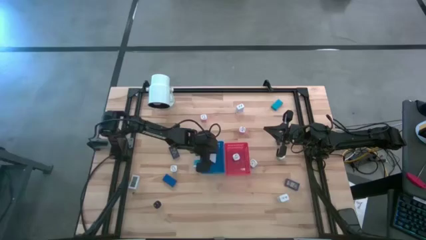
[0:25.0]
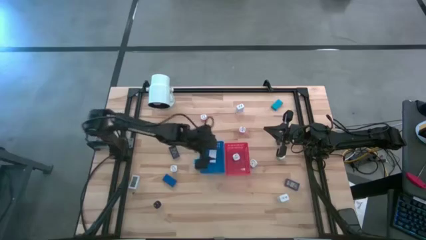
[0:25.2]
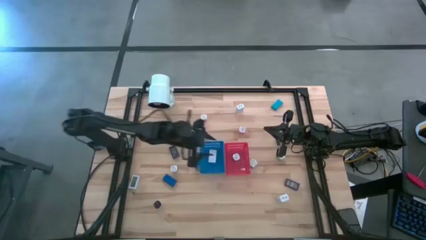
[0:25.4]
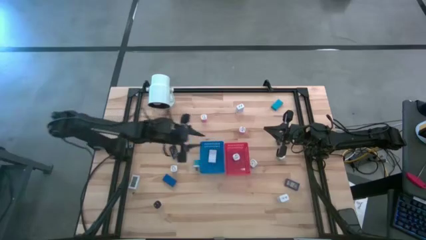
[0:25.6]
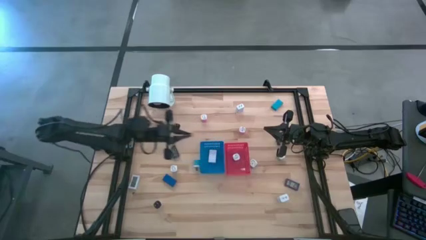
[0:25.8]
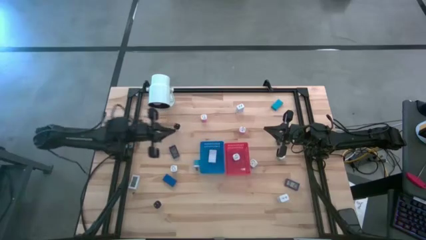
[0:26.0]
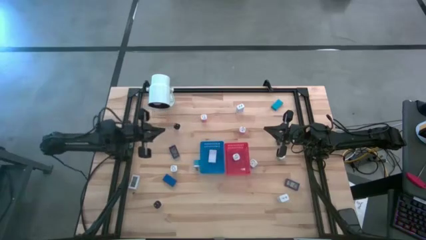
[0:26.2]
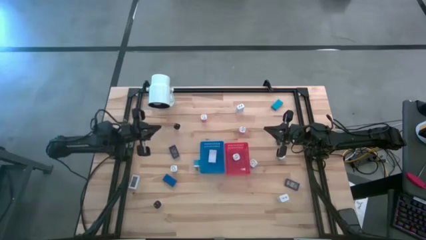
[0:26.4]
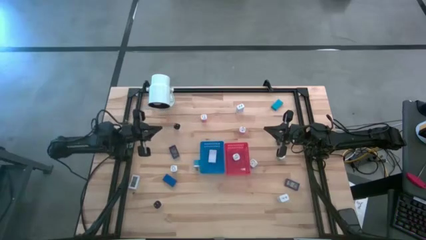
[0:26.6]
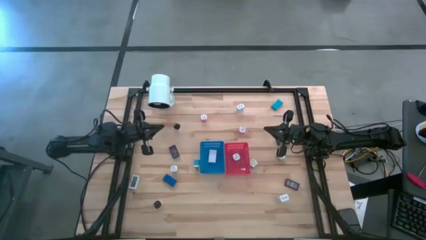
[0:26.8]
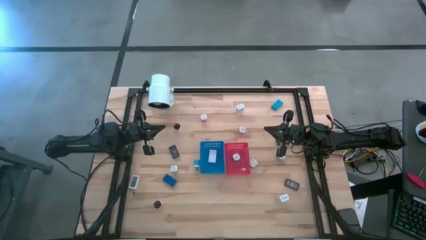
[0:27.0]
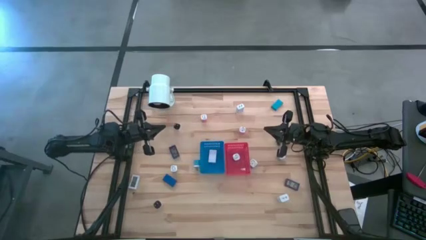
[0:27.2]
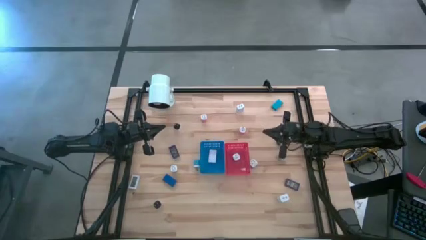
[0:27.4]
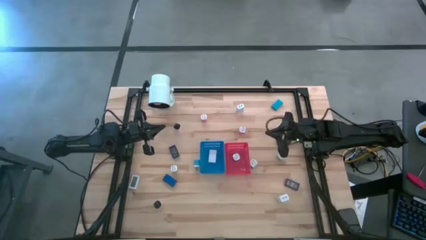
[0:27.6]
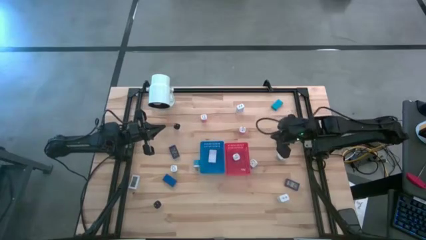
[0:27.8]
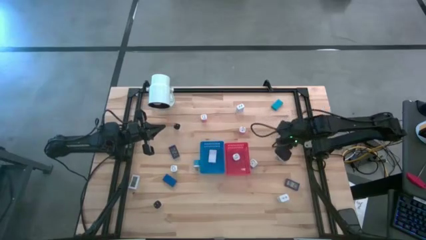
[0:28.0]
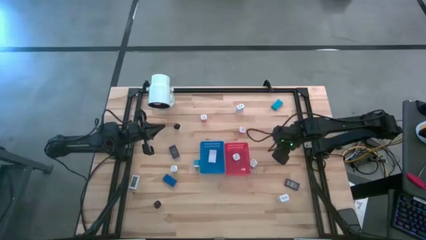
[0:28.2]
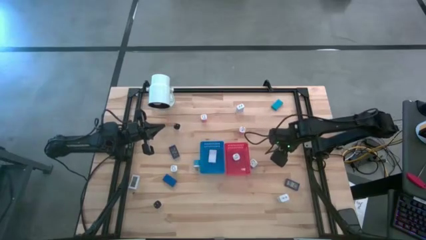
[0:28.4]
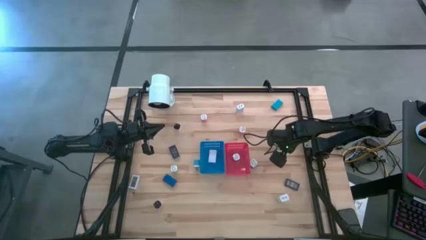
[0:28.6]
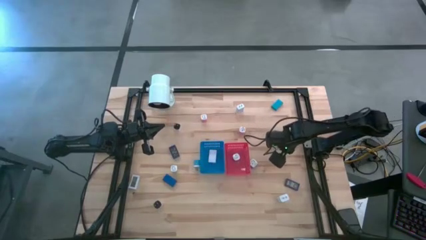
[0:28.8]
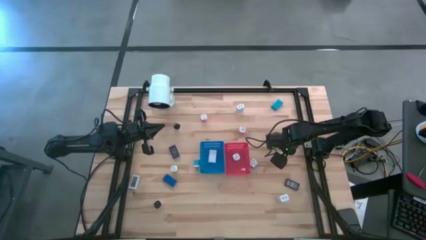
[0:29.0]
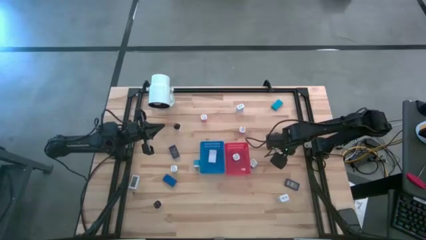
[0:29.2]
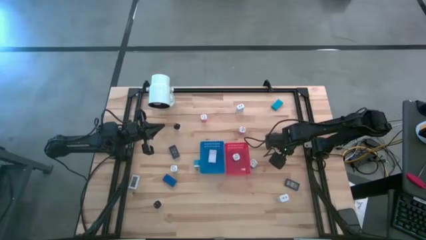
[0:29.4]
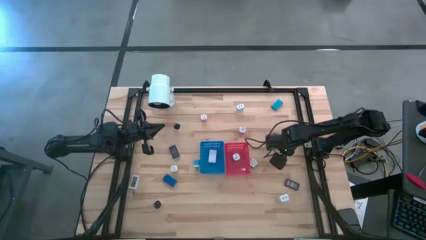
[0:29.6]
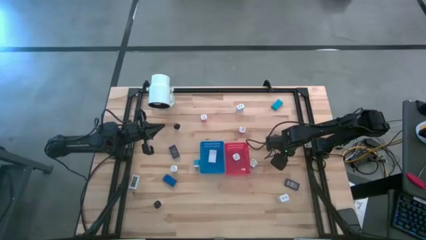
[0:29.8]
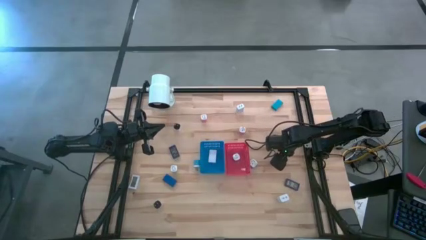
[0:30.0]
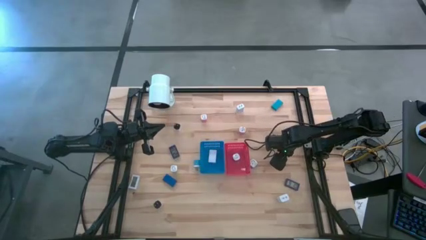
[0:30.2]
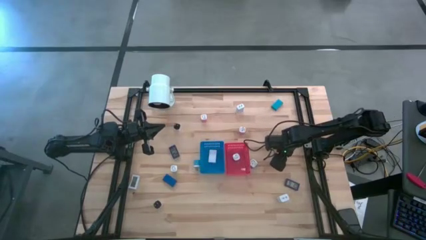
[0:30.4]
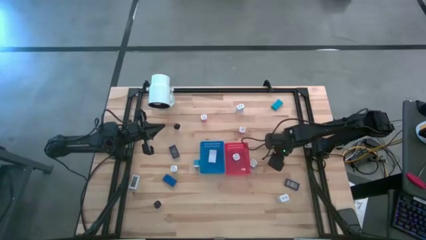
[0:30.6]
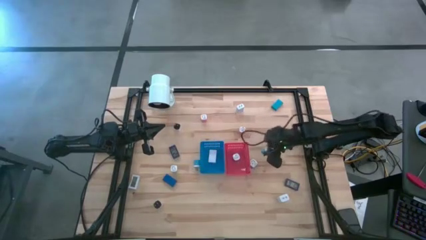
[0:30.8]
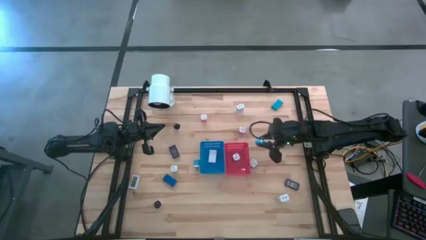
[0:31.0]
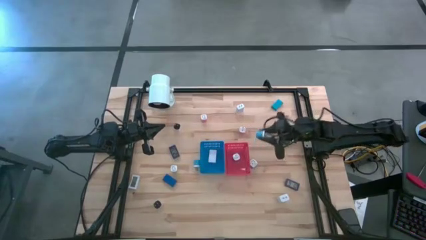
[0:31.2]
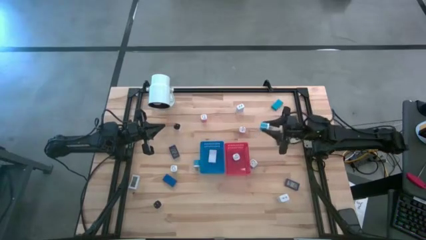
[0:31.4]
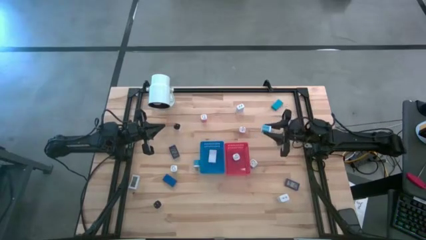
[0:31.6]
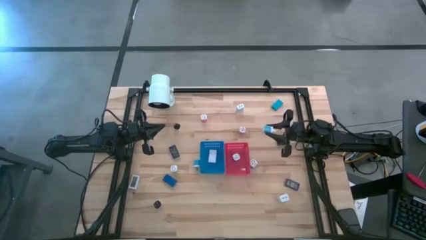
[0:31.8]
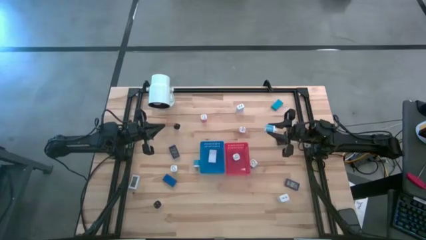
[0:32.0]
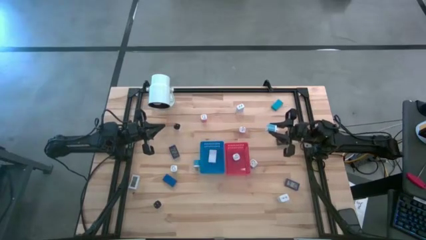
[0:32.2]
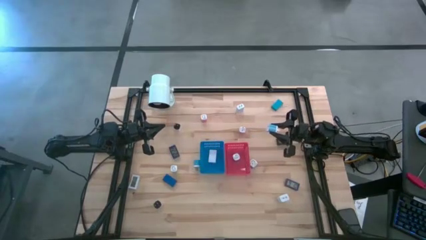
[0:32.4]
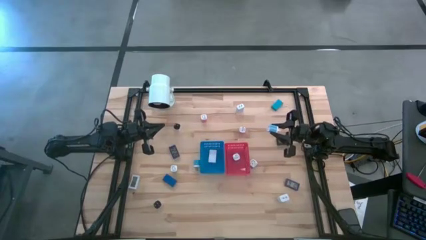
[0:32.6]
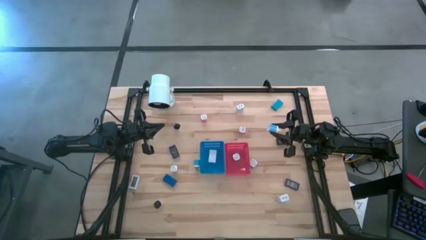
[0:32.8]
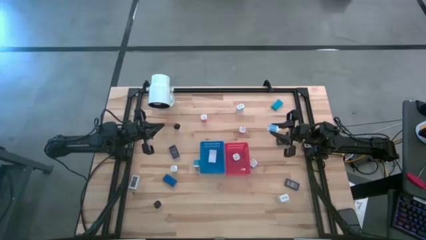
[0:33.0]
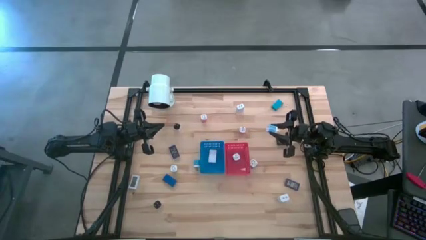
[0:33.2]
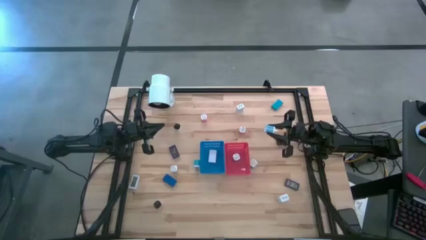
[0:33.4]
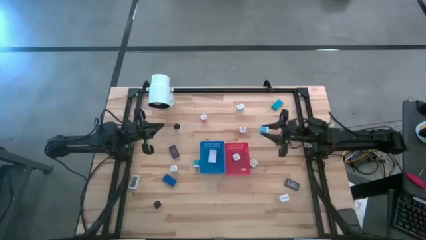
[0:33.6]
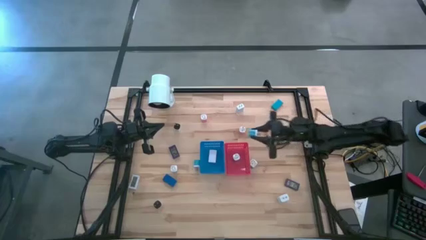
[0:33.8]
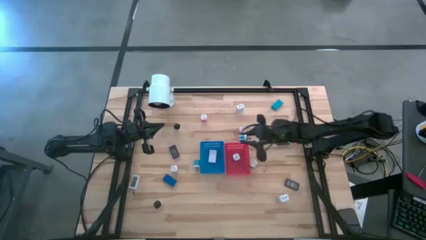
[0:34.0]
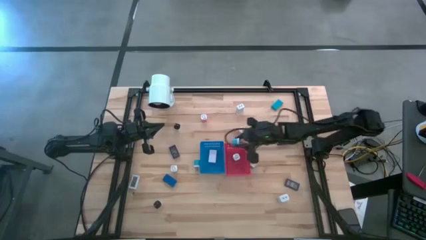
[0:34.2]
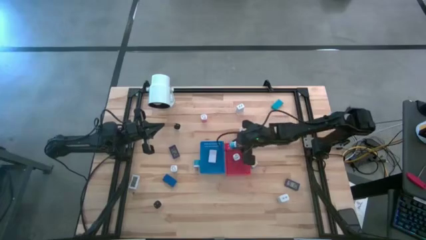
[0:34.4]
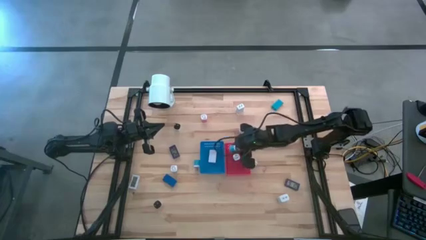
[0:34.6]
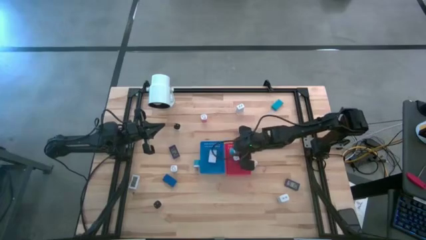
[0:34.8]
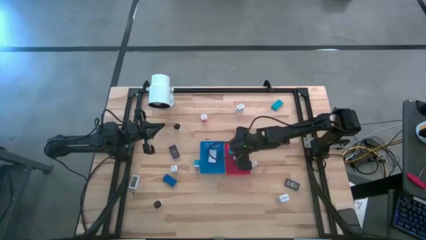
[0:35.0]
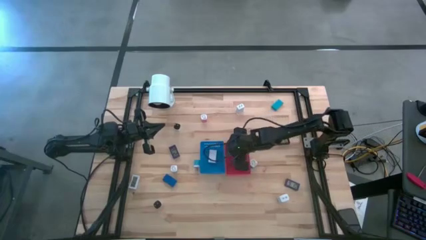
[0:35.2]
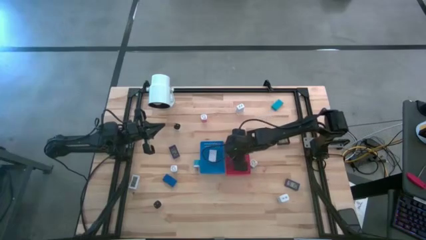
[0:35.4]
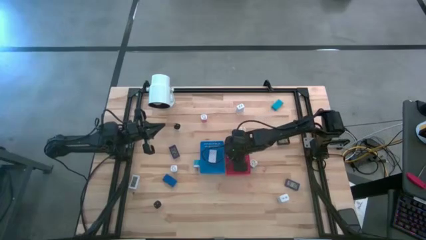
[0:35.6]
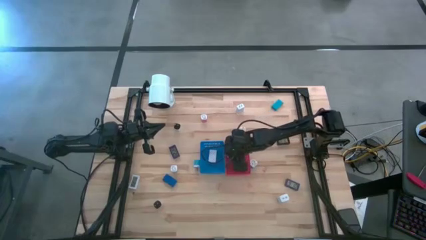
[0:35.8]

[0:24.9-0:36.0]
Task: Sort adapters and digital timers
Put the right light blue charger adaptor into the red bin
